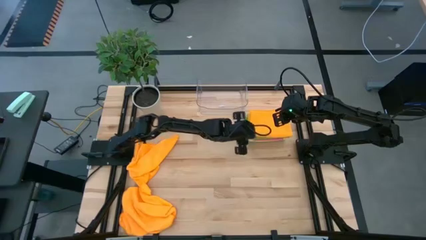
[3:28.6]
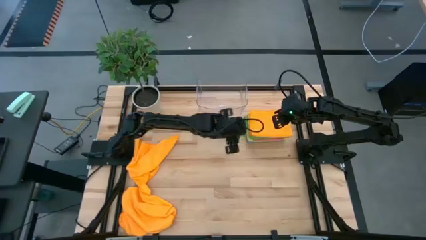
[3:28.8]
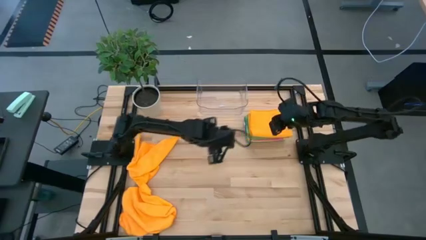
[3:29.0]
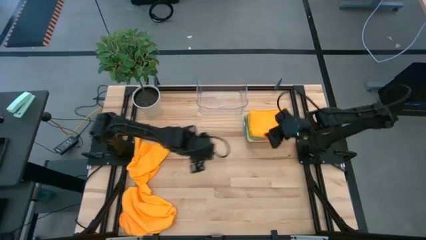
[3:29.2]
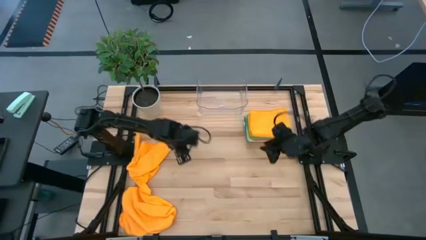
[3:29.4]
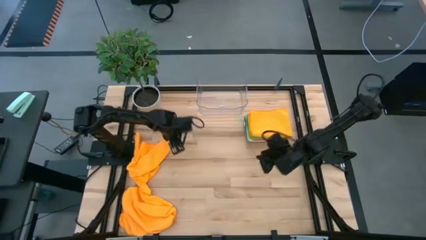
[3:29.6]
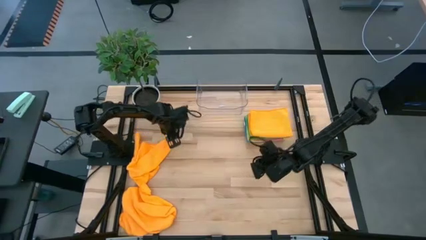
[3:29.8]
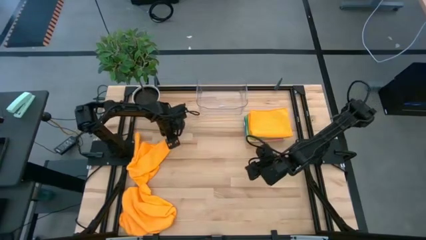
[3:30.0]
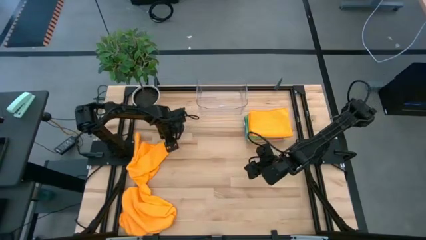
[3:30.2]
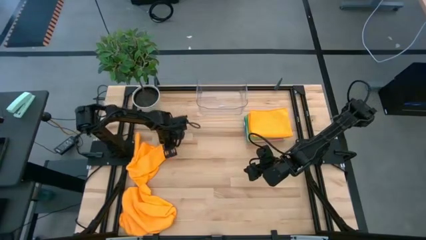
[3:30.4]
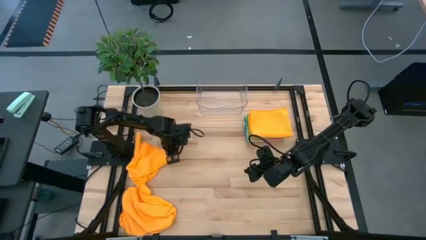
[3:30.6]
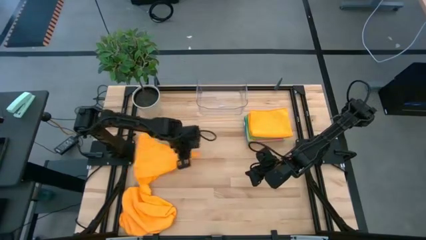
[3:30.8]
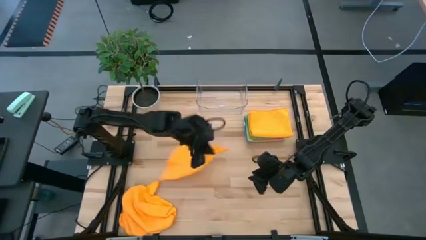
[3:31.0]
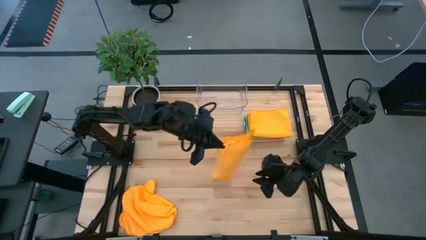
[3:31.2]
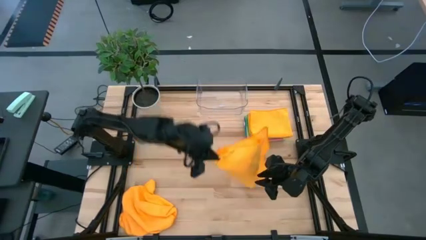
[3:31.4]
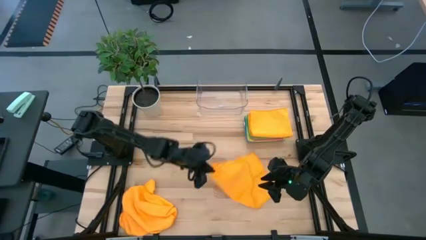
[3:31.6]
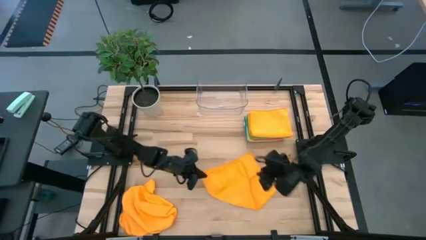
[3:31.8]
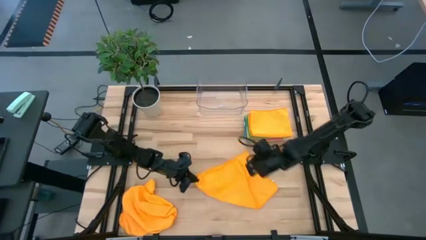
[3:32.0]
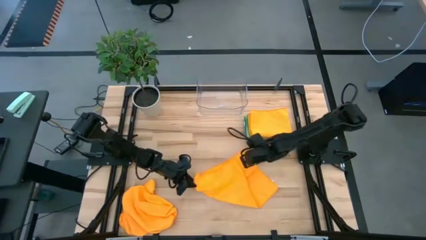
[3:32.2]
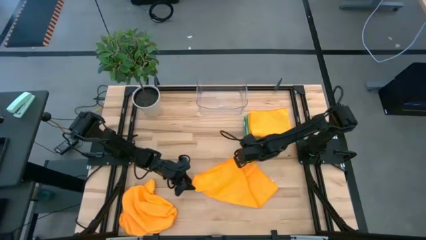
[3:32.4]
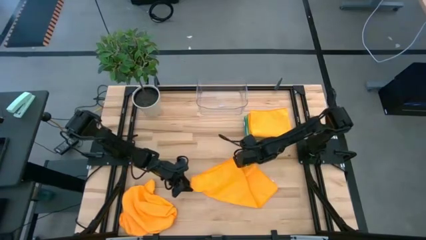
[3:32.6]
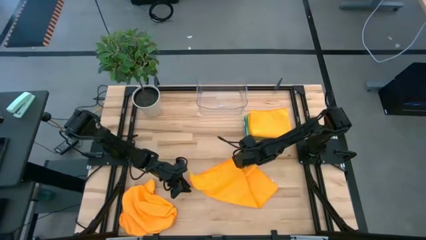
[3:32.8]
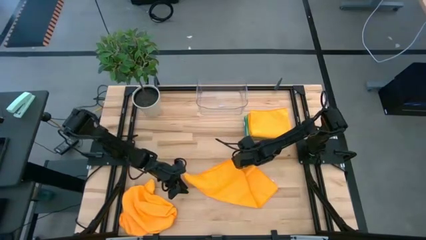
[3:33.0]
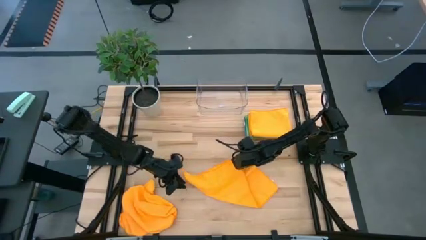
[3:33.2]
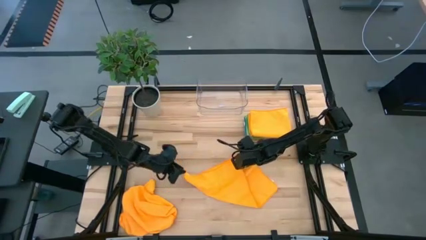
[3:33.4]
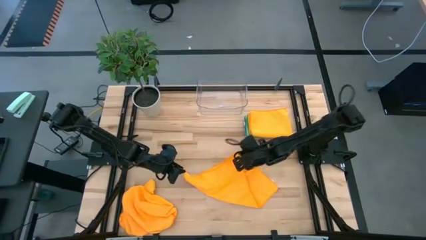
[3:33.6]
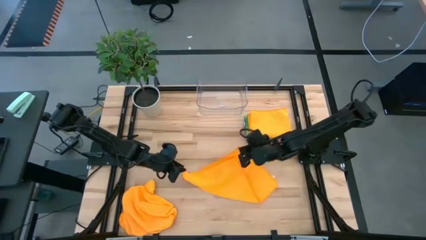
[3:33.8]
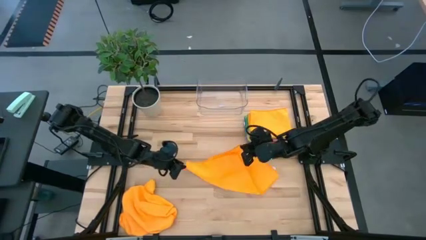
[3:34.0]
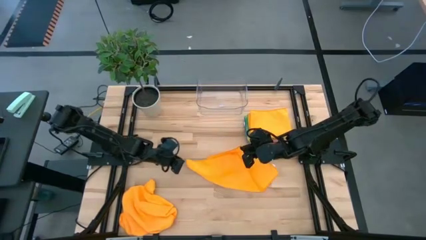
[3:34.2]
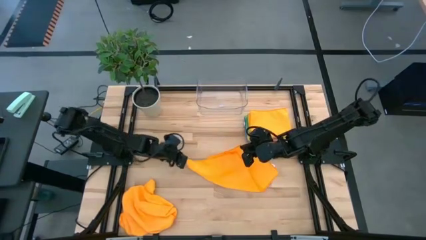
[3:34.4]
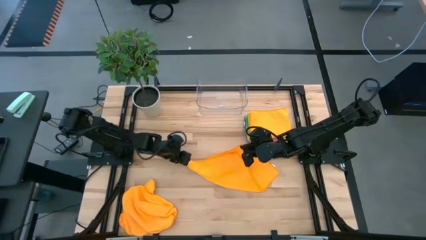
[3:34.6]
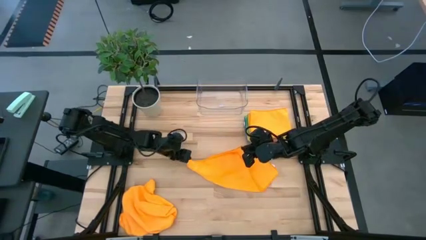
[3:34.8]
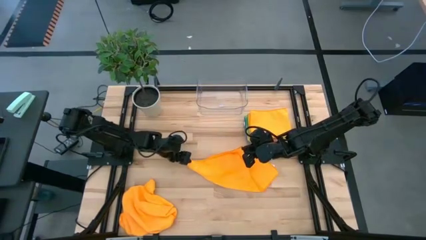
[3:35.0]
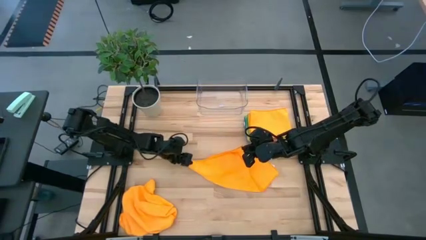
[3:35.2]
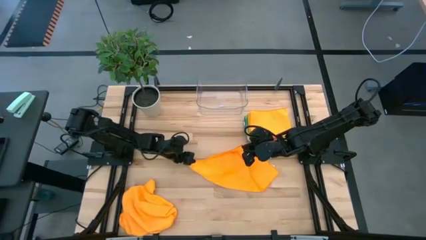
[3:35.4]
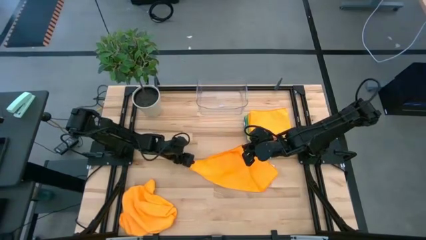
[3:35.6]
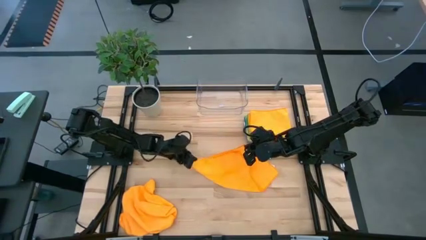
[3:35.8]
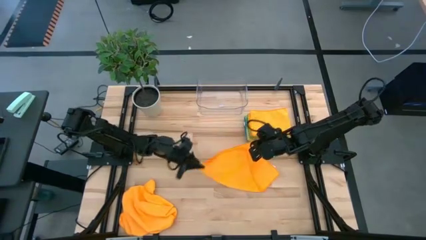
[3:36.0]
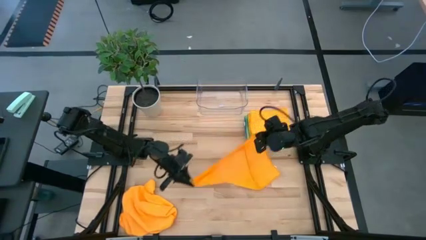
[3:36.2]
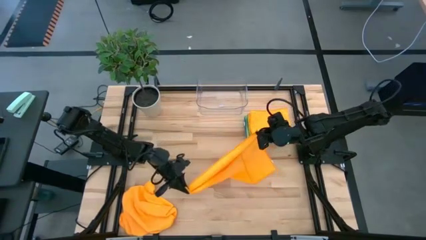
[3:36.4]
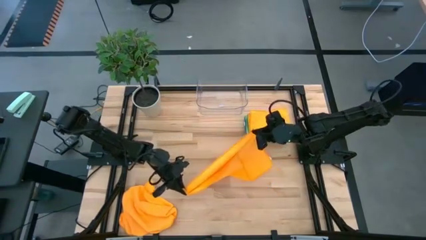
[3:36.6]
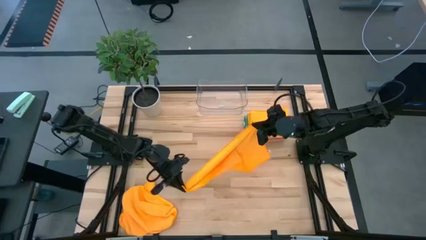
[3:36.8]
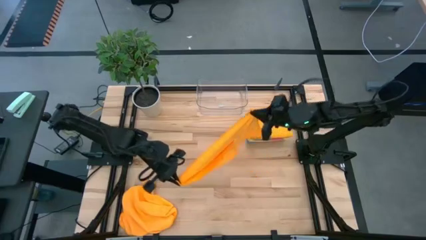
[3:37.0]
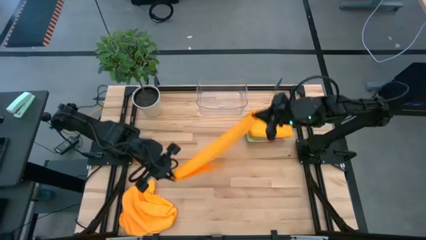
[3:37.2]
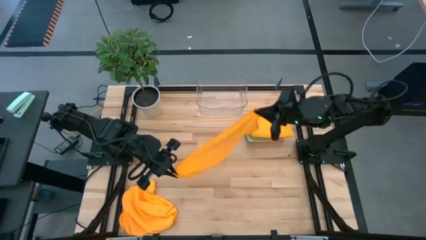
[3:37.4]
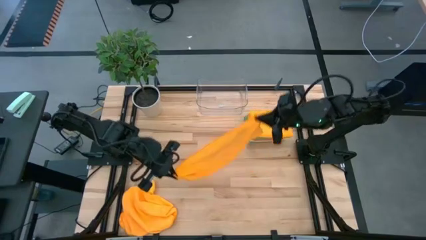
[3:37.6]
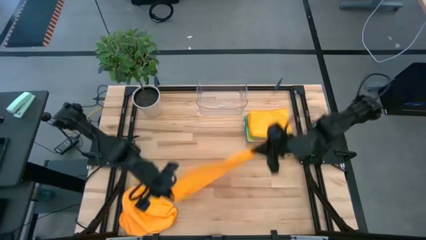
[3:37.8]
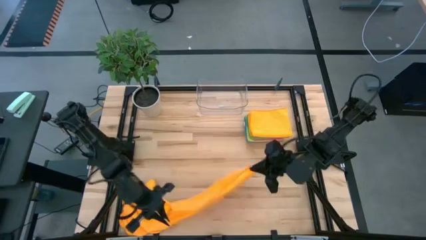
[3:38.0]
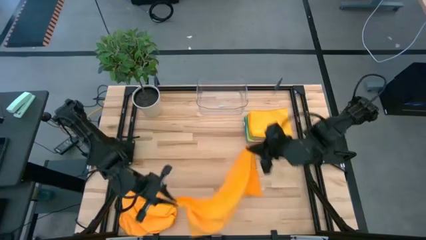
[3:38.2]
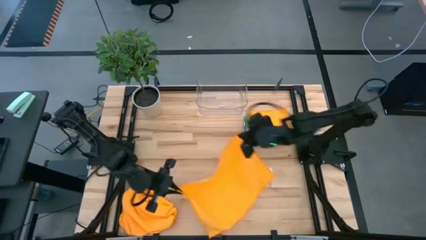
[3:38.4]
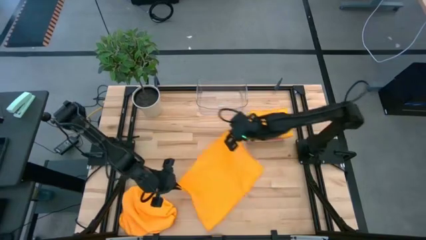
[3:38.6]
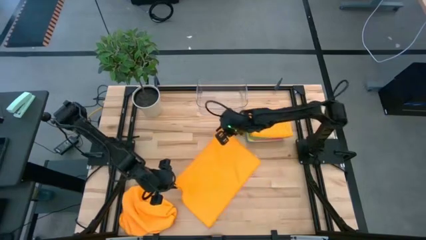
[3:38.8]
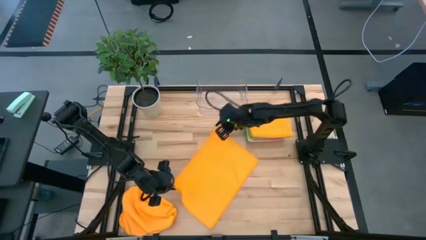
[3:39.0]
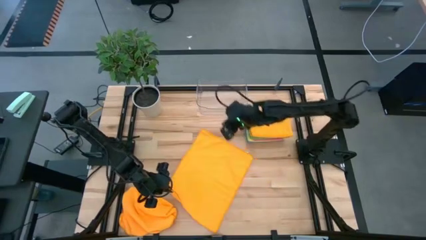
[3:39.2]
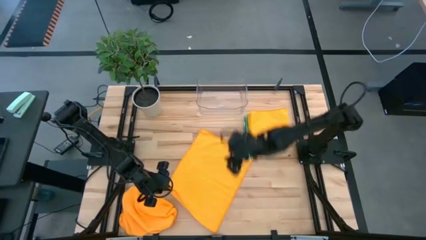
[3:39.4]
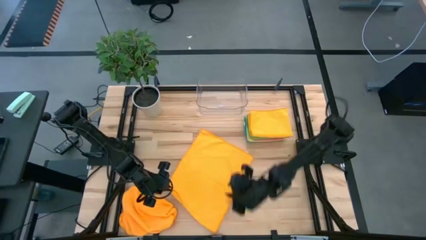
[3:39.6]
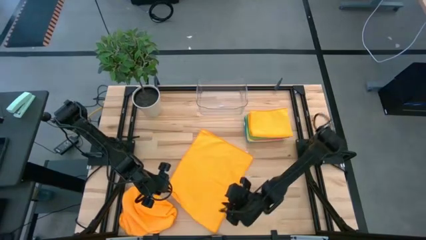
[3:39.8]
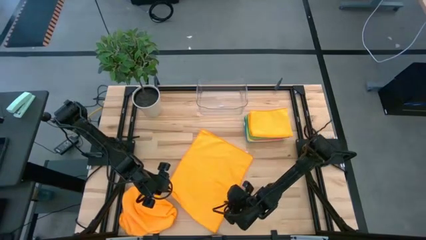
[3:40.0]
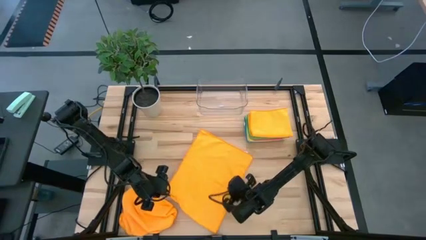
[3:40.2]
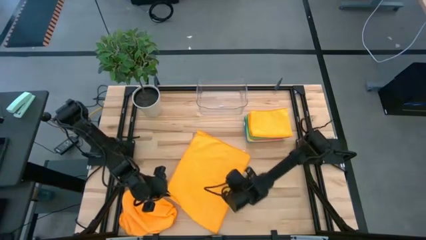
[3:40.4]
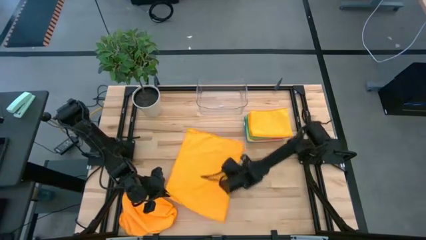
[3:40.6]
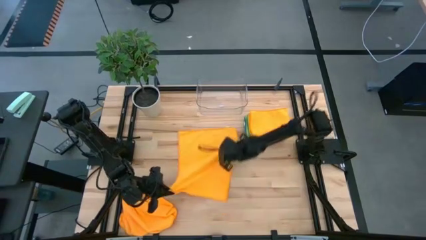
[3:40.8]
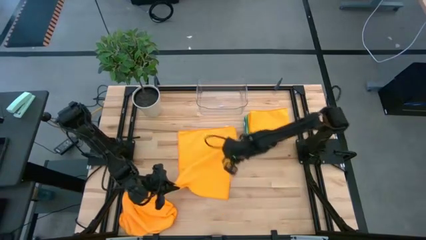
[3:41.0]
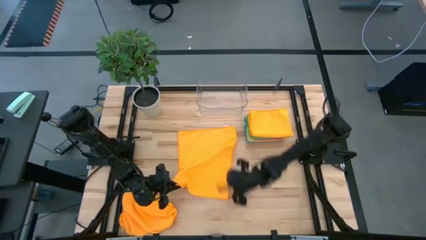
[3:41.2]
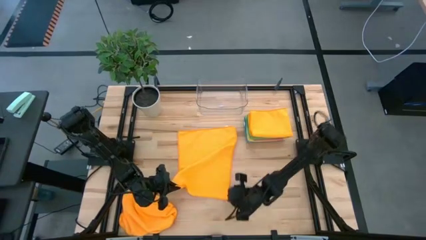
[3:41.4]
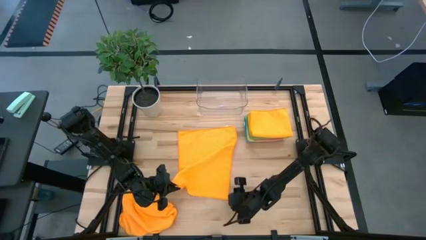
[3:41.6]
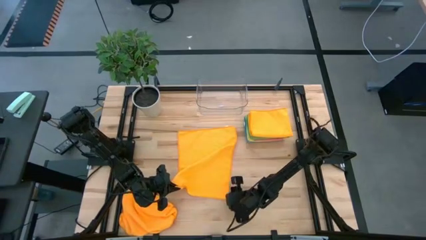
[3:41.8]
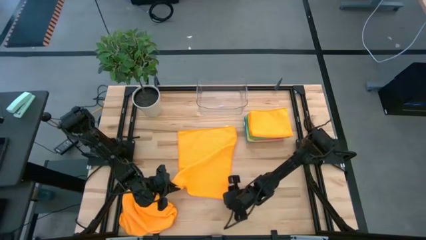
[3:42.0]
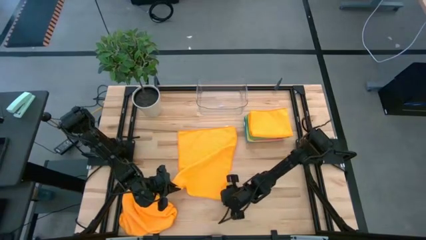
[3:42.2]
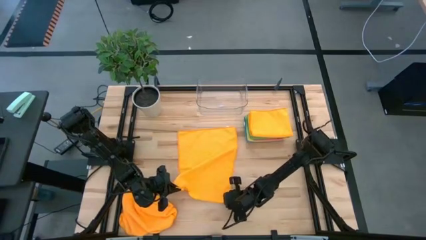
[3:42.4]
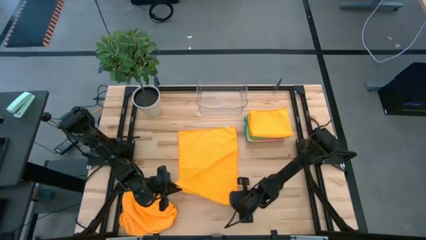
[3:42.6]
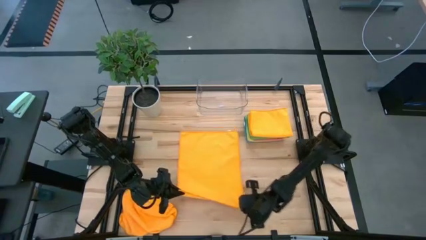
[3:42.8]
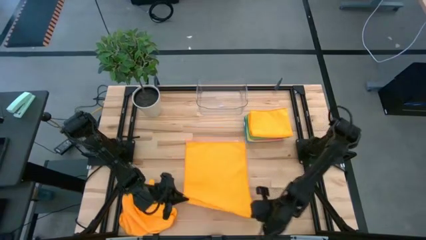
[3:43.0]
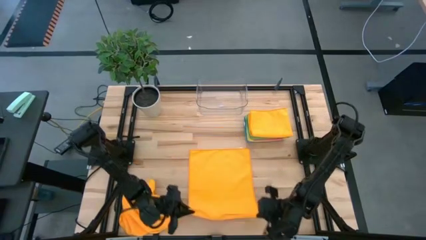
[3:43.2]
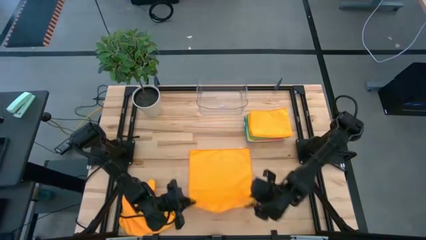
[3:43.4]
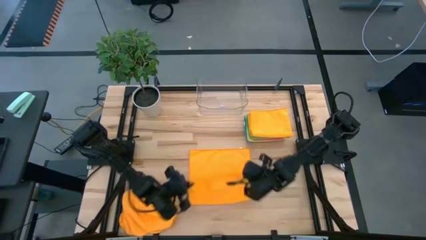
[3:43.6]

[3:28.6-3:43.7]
Task: Fold microfiber towels
Fold the top orange towel

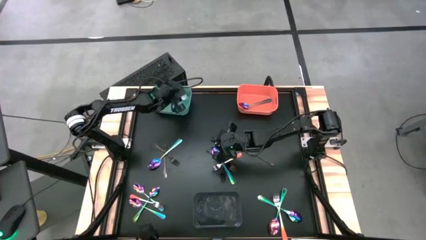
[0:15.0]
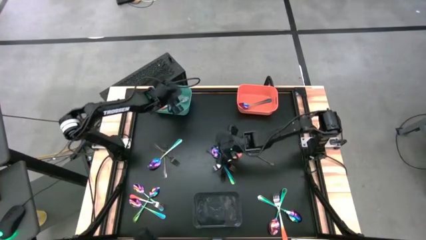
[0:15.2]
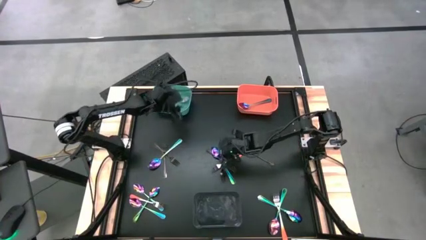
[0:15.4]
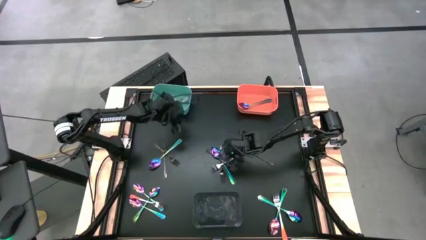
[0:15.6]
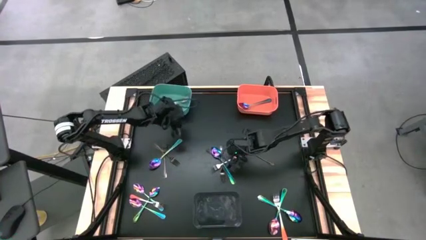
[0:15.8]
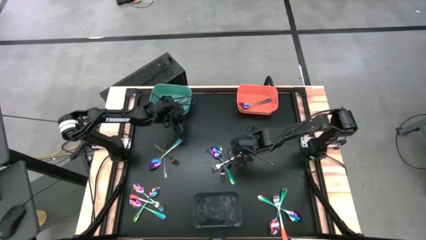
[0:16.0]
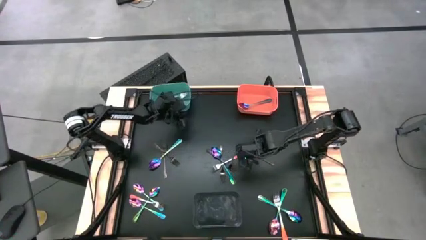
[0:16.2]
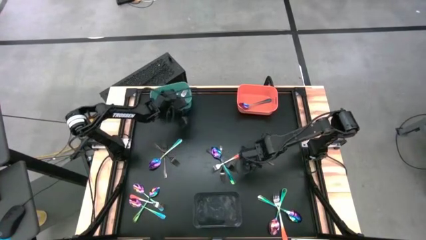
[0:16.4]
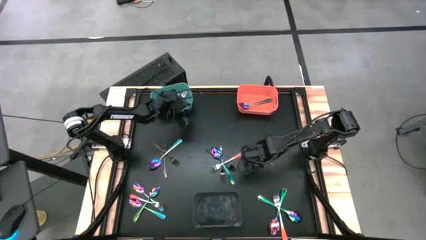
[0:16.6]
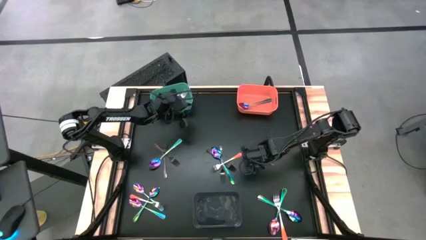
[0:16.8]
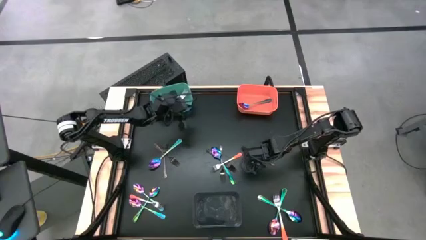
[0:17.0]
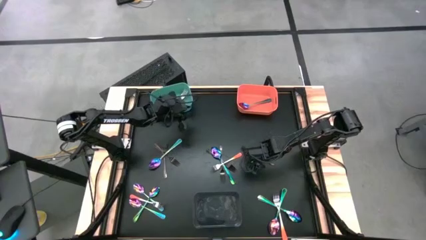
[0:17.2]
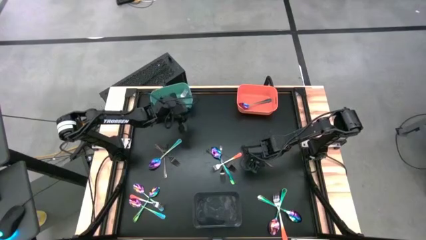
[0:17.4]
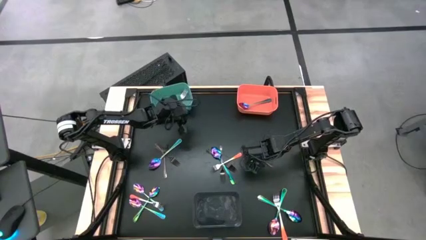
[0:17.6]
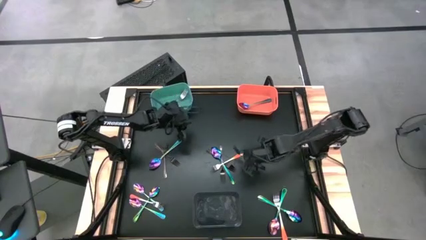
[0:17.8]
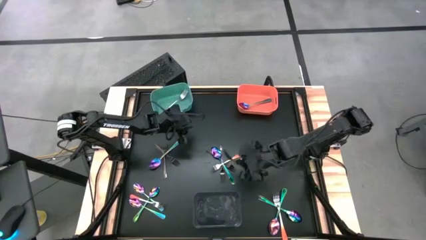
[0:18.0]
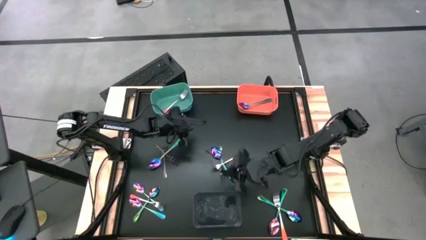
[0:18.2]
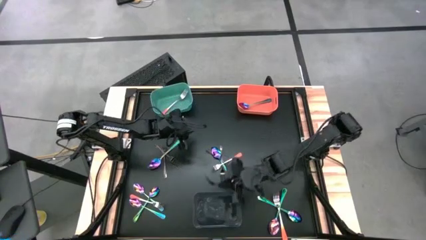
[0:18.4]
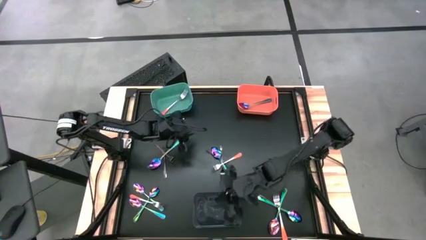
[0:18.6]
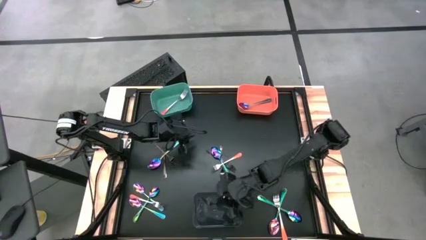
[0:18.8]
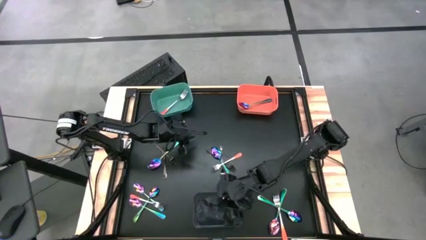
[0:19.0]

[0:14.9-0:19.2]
Task: Sort silverware by color (type)
Put the black fork into the black bin
